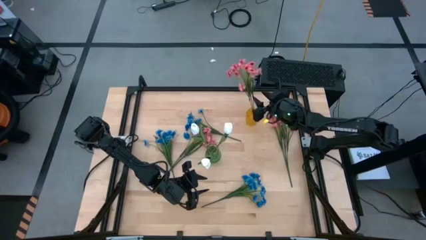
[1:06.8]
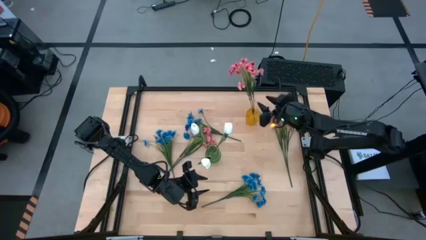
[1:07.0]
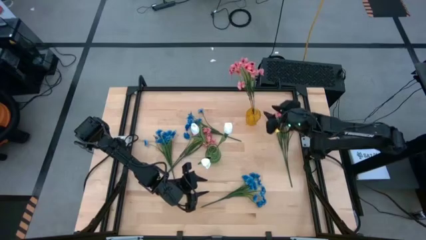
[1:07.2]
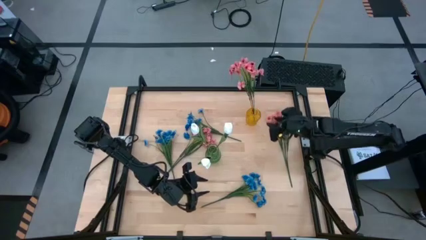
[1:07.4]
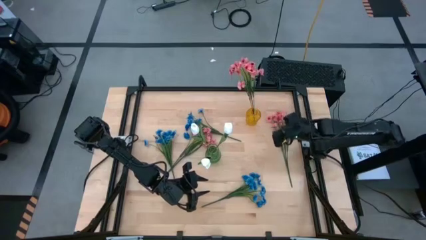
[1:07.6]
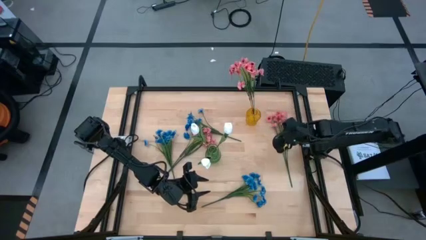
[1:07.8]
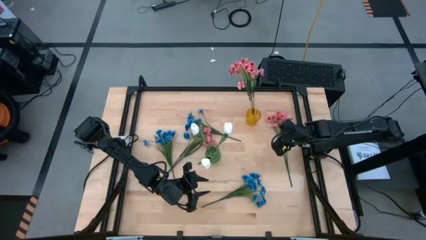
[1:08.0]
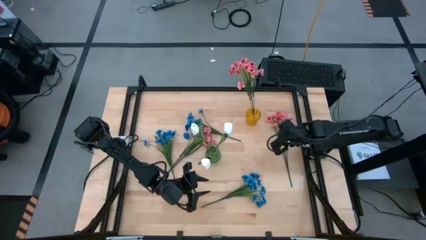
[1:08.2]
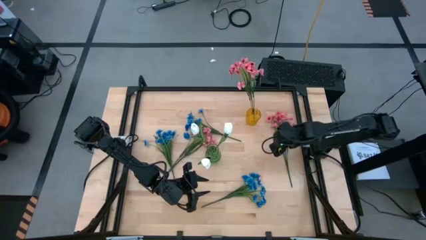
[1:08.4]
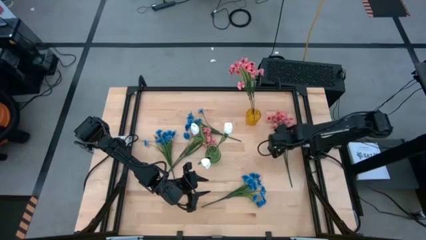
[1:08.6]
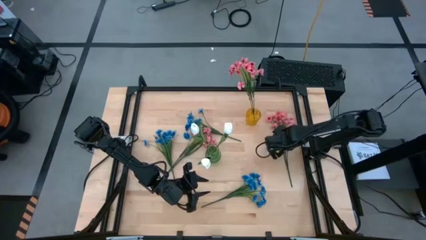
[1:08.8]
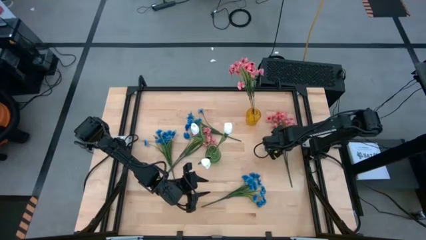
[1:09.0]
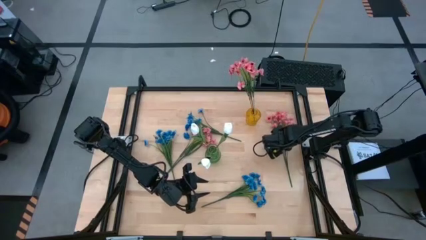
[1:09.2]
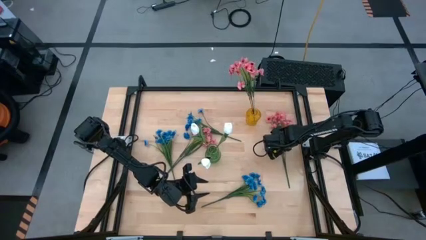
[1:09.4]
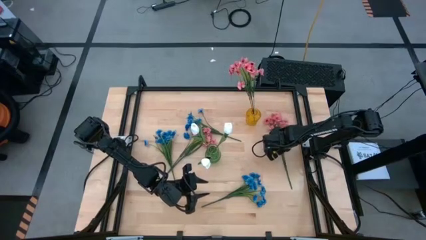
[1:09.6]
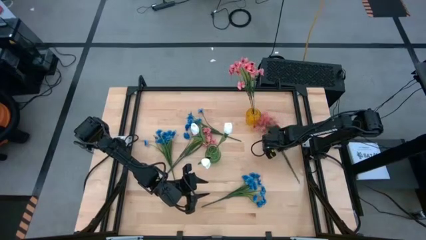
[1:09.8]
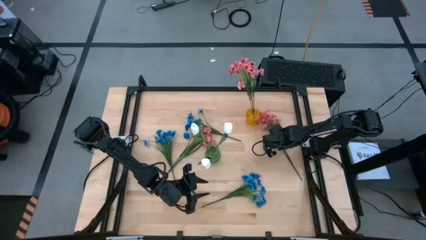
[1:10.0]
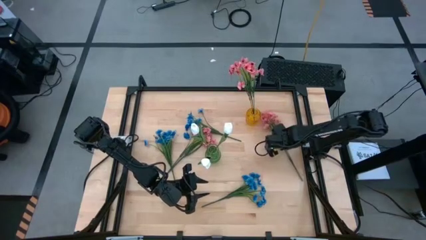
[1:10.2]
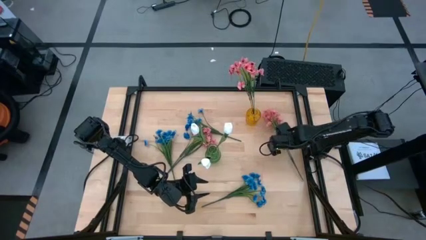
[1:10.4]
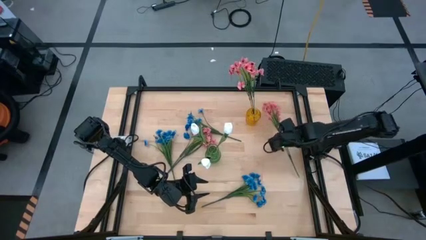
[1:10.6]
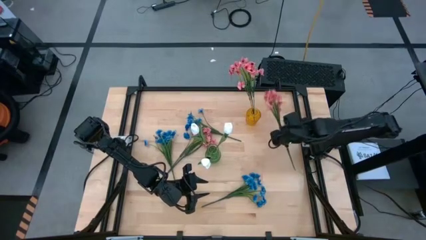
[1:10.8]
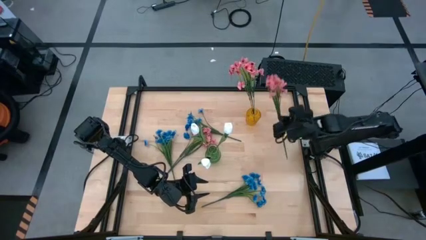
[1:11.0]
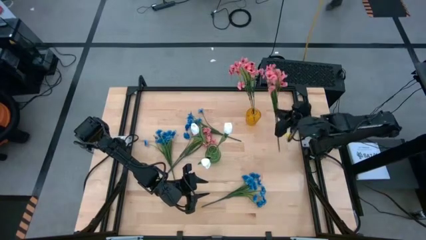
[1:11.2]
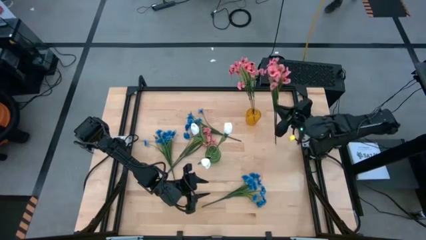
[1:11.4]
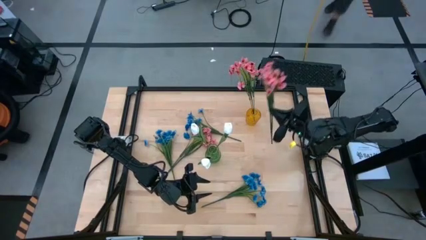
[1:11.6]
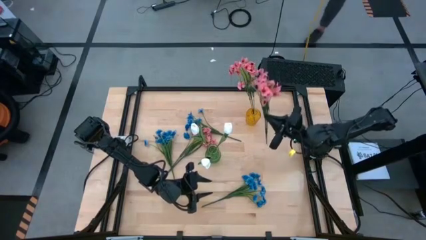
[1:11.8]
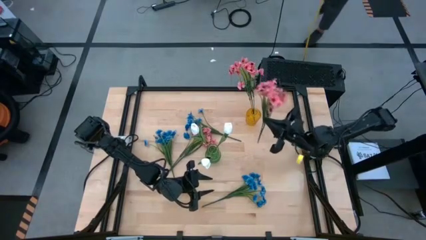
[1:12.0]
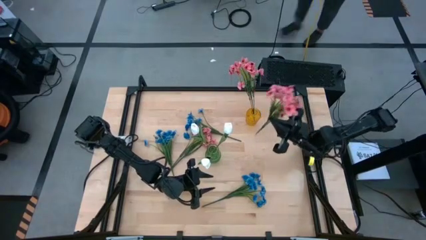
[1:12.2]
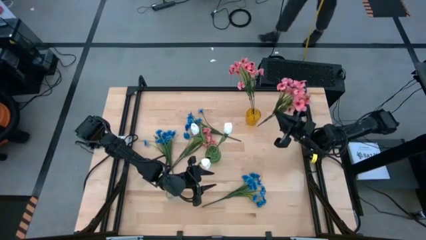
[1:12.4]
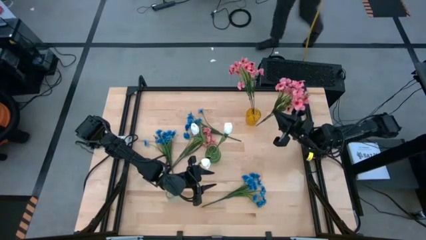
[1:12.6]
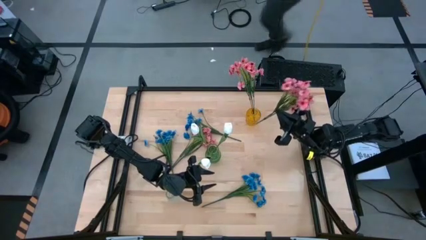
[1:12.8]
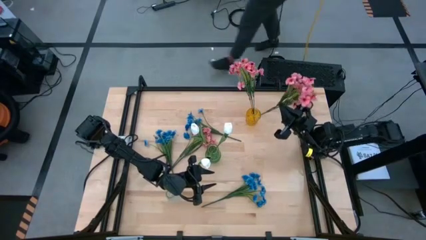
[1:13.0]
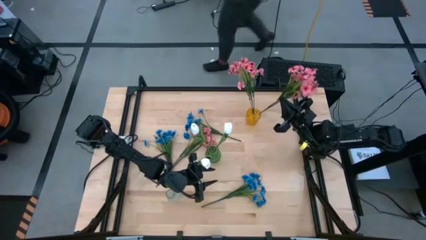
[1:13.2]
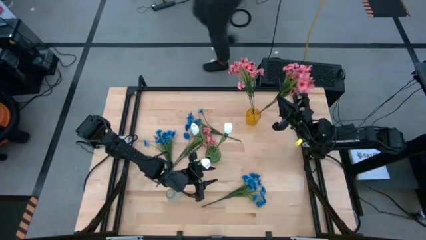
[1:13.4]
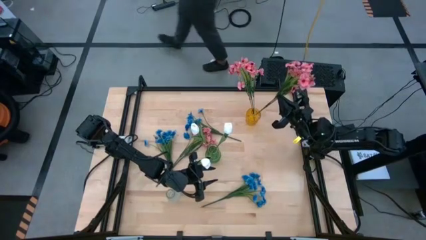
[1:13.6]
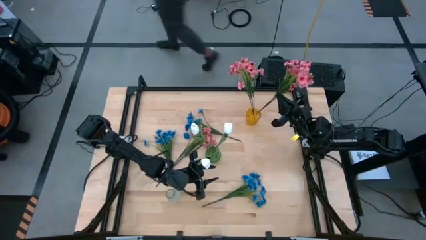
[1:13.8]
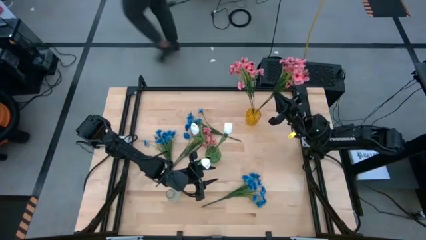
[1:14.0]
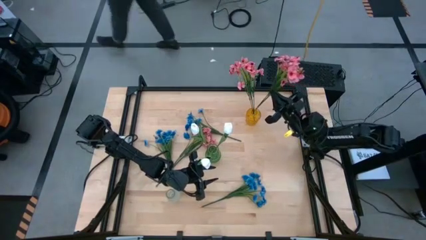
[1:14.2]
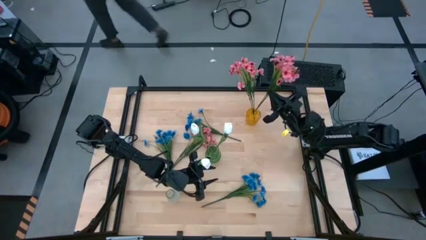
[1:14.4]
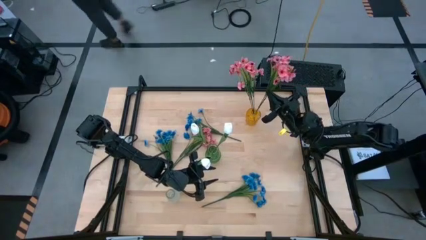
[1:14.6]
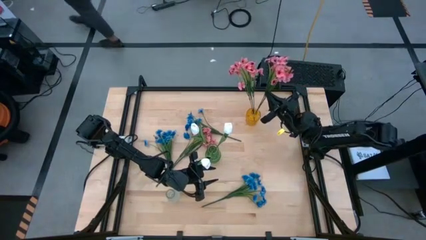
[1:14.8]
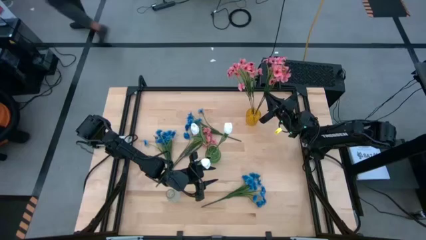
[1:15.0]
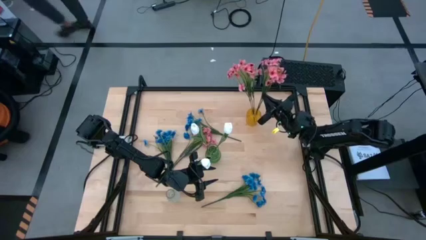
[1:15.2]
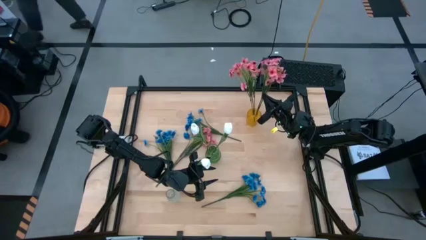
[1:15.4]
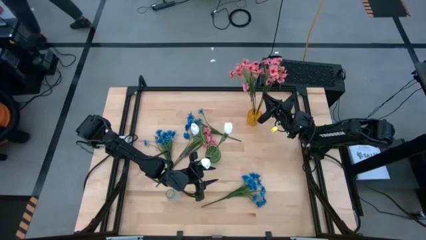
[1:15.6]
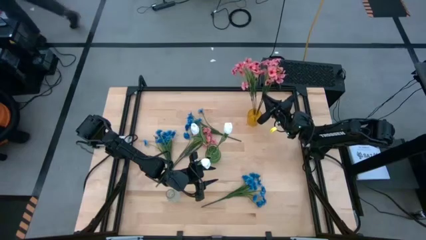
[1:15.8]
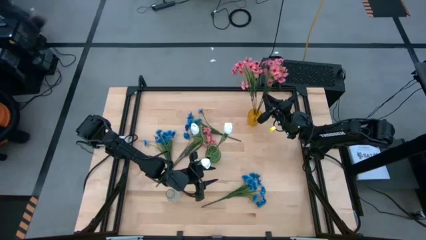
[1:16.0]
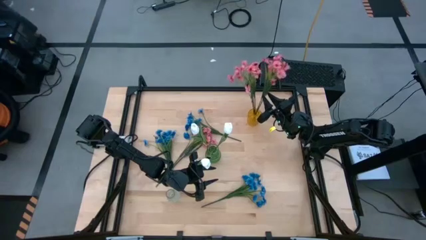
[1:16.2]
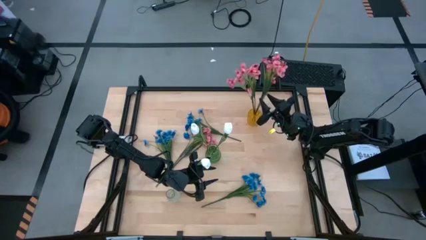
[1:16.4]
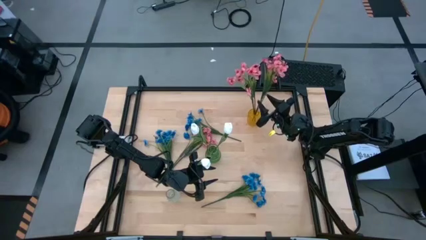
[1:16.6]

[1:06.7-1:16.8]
Task: Sort flowers into vase by color
Put the right pink flowers into the yellow vase
